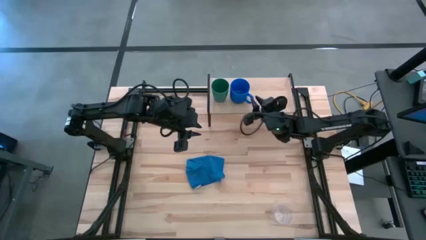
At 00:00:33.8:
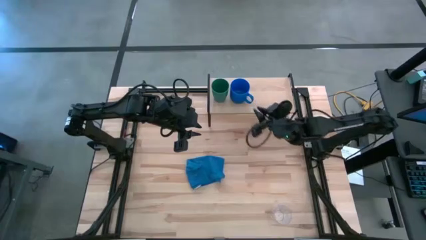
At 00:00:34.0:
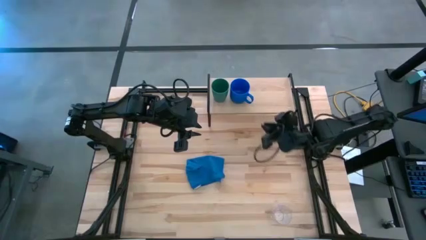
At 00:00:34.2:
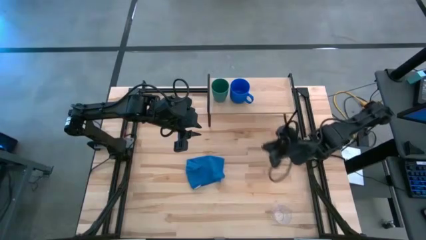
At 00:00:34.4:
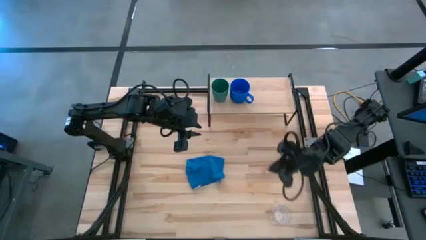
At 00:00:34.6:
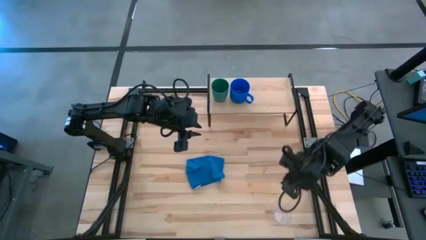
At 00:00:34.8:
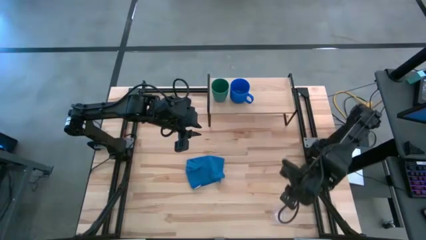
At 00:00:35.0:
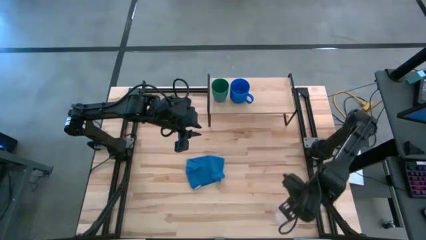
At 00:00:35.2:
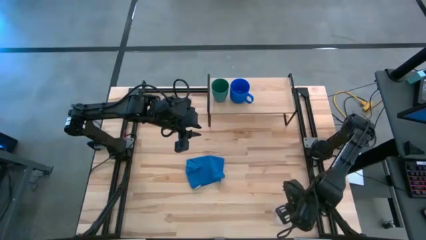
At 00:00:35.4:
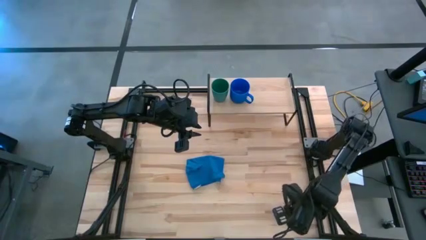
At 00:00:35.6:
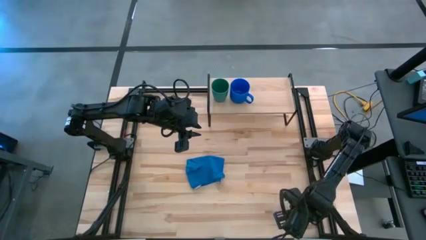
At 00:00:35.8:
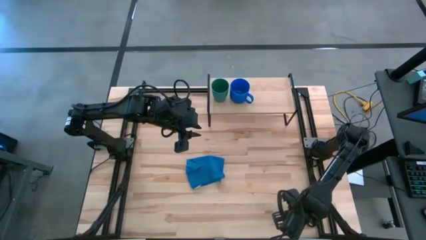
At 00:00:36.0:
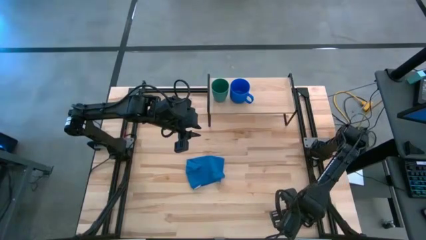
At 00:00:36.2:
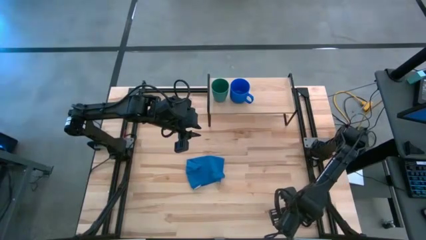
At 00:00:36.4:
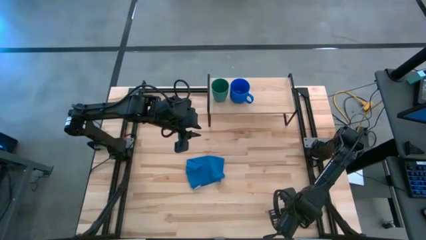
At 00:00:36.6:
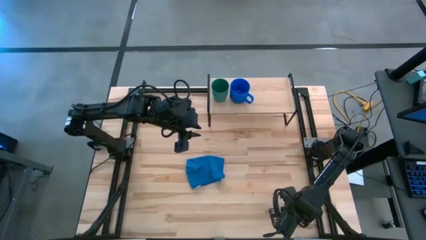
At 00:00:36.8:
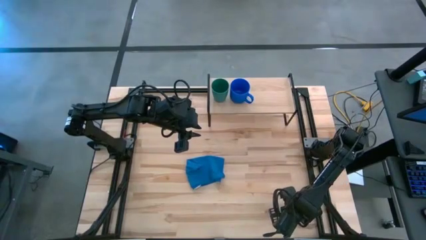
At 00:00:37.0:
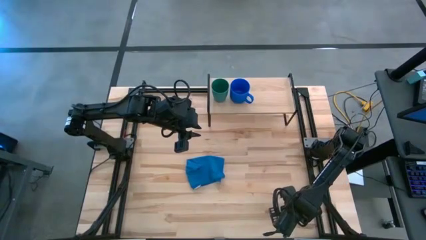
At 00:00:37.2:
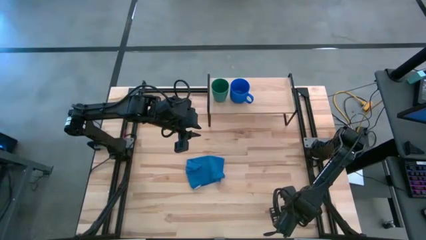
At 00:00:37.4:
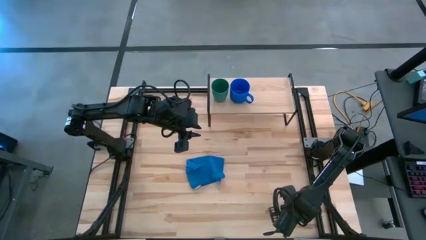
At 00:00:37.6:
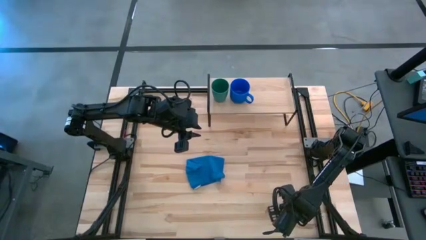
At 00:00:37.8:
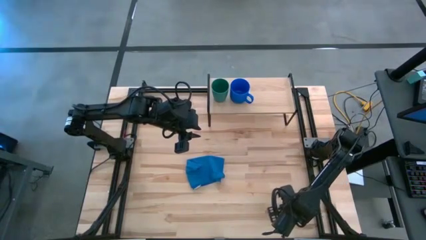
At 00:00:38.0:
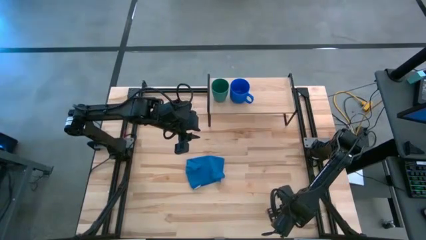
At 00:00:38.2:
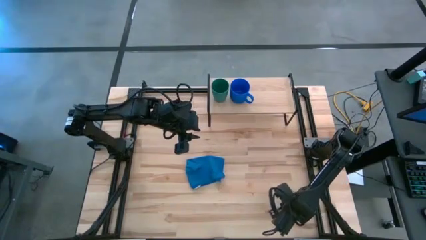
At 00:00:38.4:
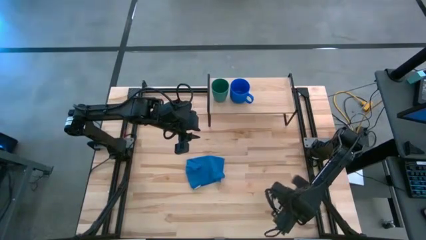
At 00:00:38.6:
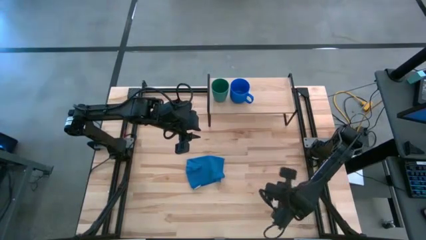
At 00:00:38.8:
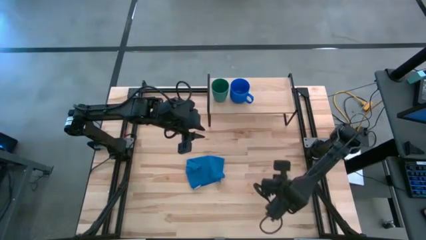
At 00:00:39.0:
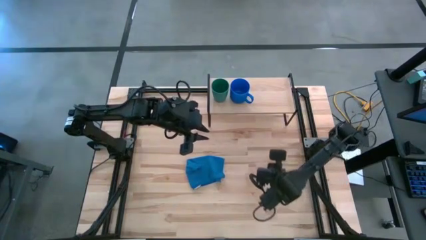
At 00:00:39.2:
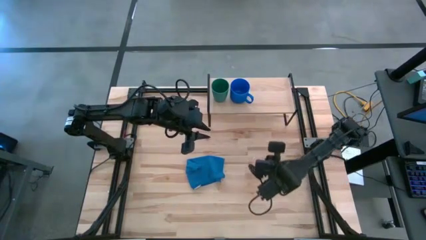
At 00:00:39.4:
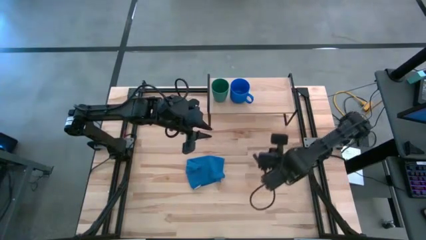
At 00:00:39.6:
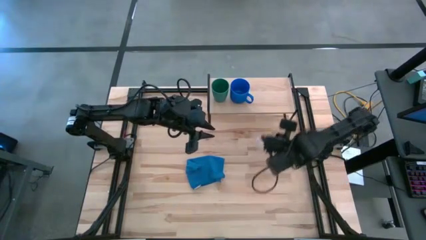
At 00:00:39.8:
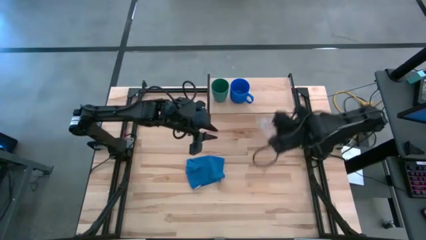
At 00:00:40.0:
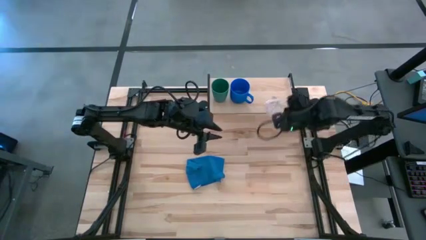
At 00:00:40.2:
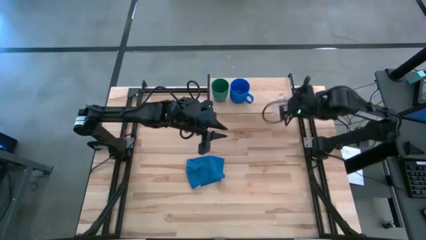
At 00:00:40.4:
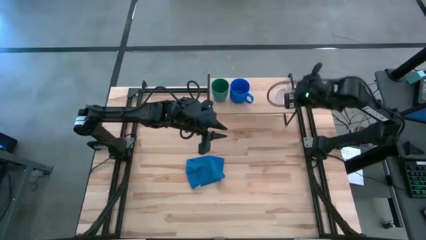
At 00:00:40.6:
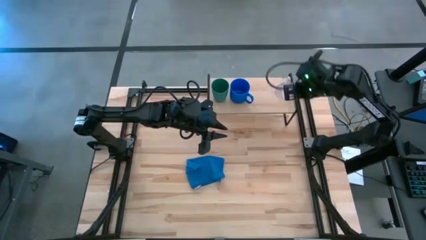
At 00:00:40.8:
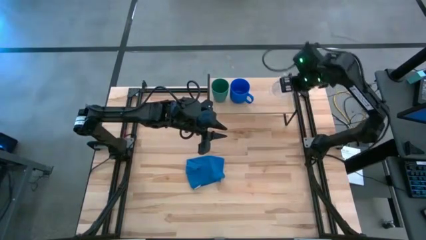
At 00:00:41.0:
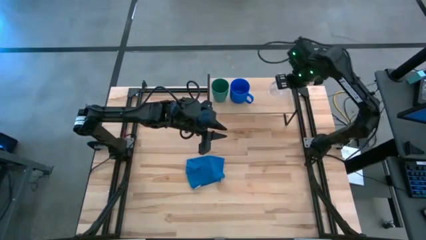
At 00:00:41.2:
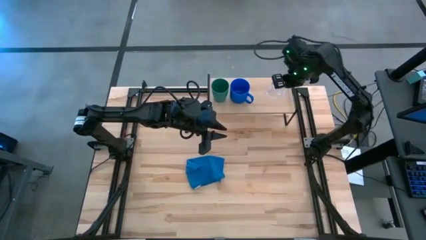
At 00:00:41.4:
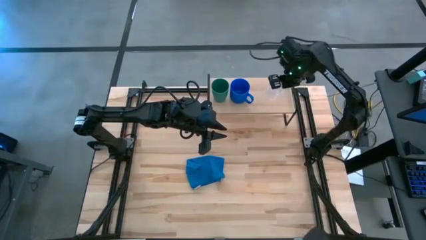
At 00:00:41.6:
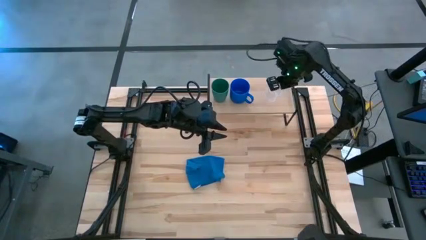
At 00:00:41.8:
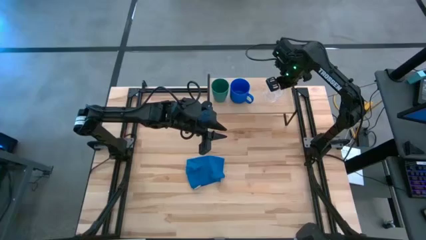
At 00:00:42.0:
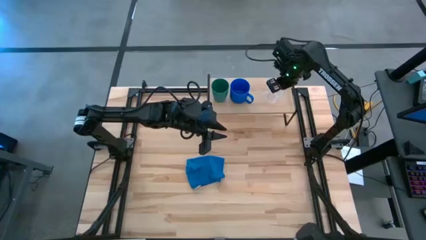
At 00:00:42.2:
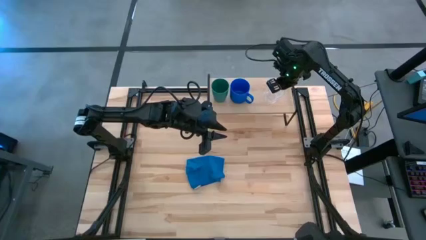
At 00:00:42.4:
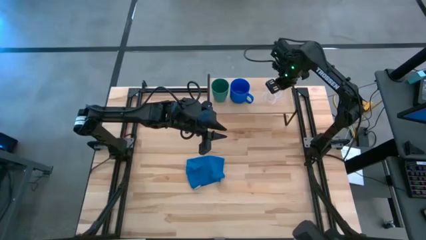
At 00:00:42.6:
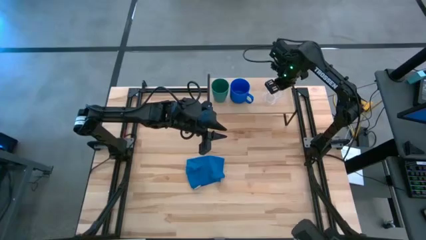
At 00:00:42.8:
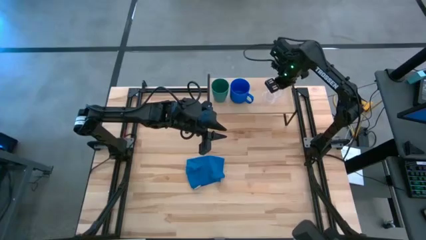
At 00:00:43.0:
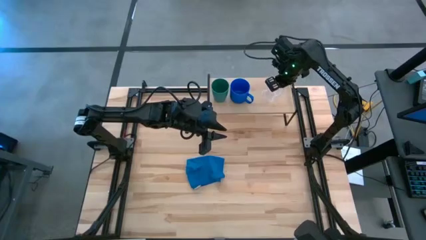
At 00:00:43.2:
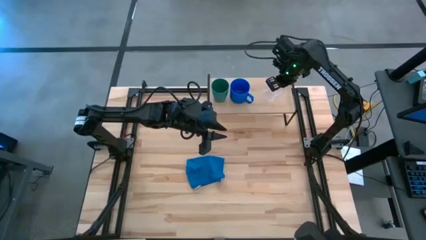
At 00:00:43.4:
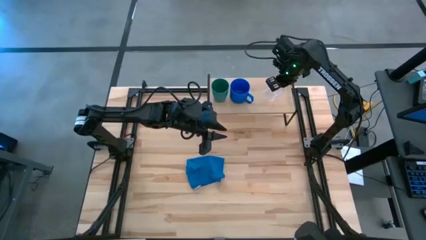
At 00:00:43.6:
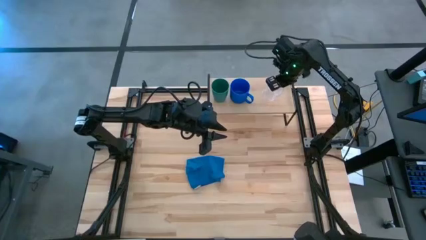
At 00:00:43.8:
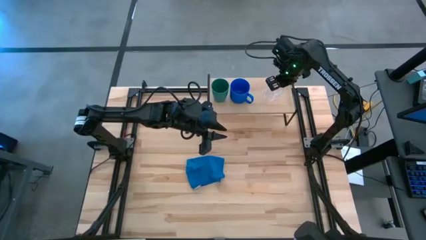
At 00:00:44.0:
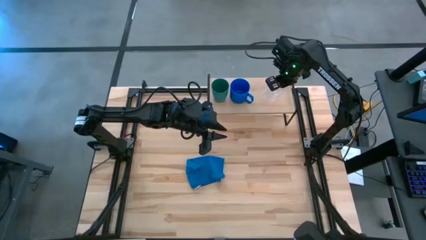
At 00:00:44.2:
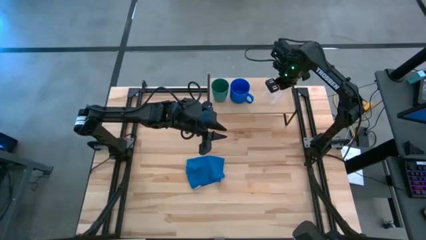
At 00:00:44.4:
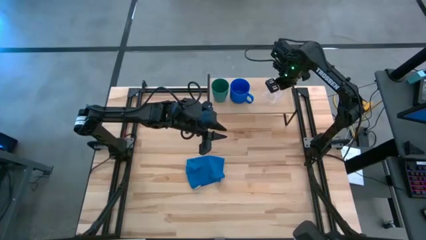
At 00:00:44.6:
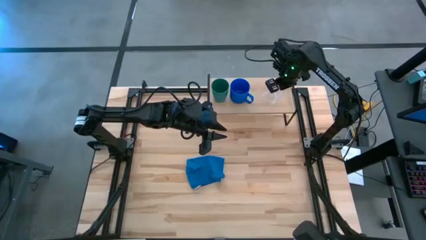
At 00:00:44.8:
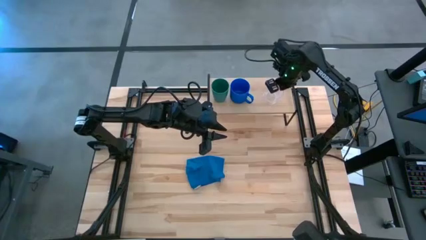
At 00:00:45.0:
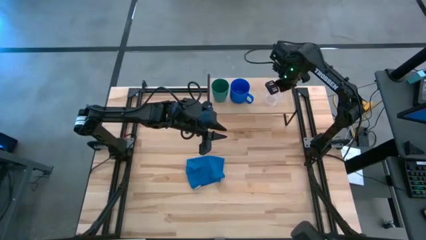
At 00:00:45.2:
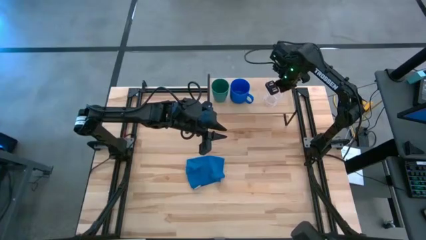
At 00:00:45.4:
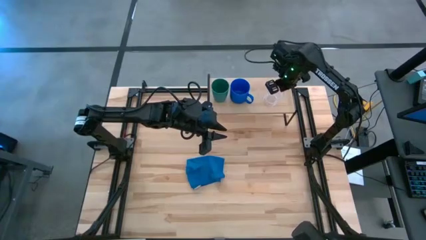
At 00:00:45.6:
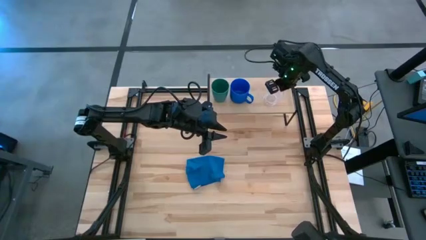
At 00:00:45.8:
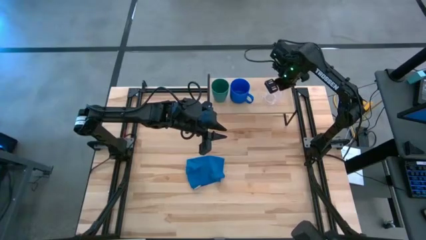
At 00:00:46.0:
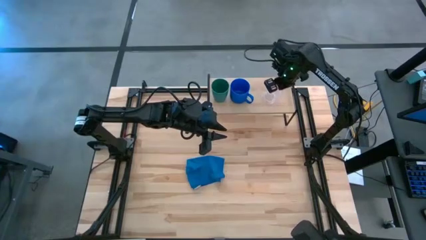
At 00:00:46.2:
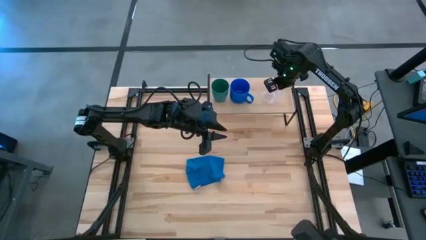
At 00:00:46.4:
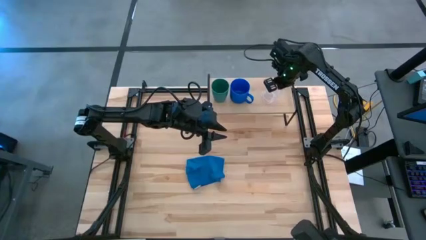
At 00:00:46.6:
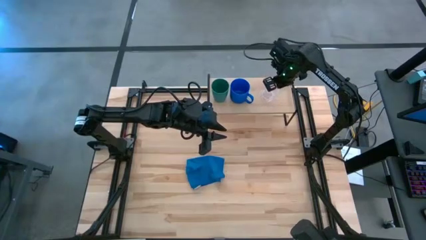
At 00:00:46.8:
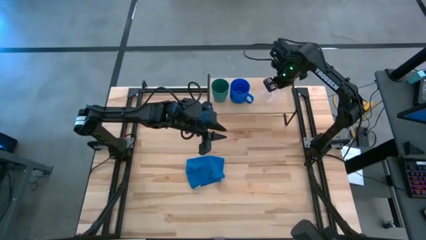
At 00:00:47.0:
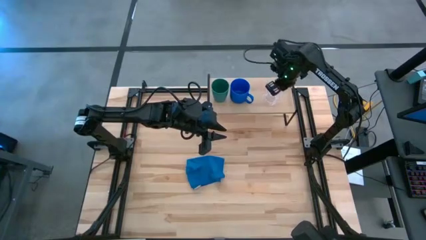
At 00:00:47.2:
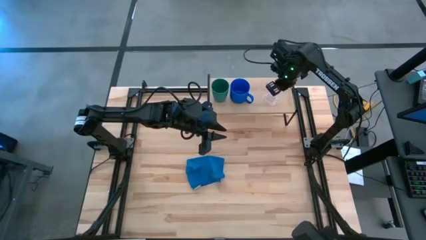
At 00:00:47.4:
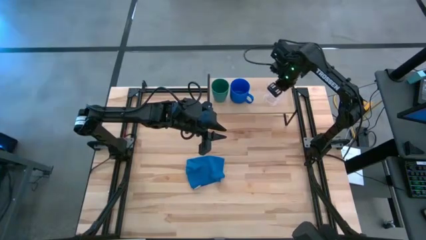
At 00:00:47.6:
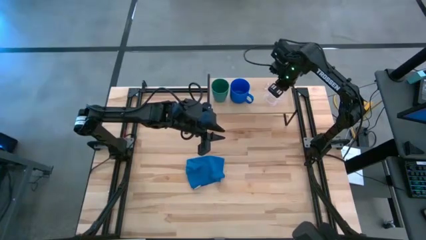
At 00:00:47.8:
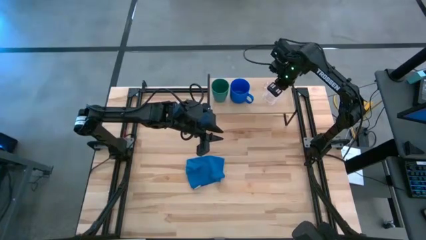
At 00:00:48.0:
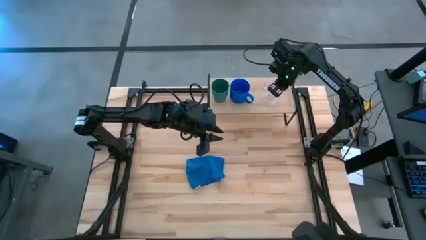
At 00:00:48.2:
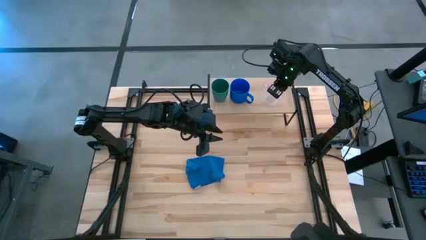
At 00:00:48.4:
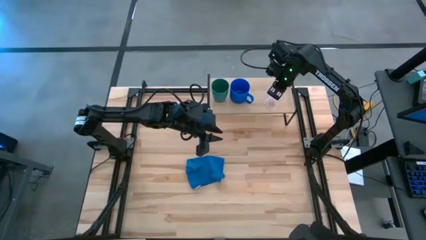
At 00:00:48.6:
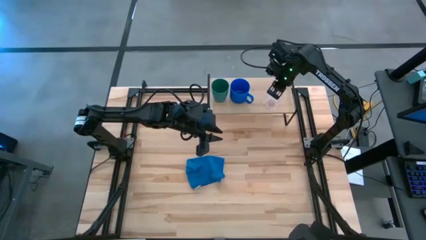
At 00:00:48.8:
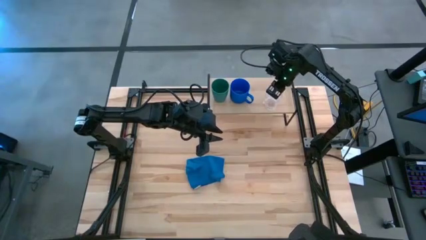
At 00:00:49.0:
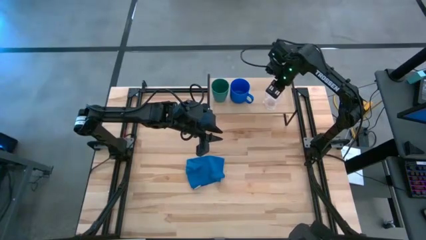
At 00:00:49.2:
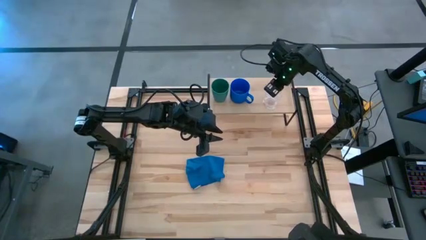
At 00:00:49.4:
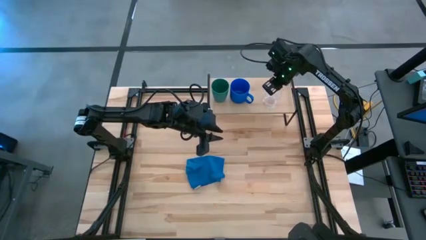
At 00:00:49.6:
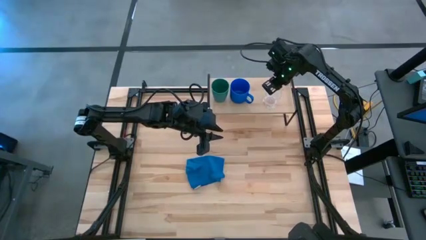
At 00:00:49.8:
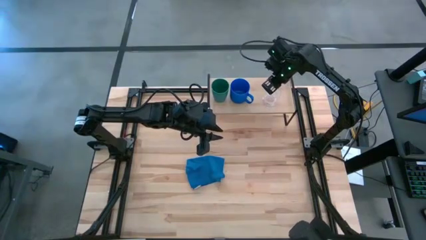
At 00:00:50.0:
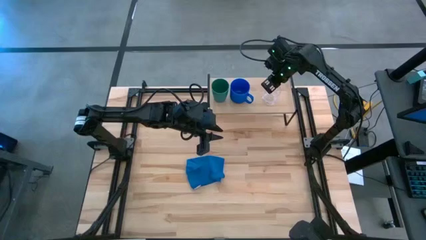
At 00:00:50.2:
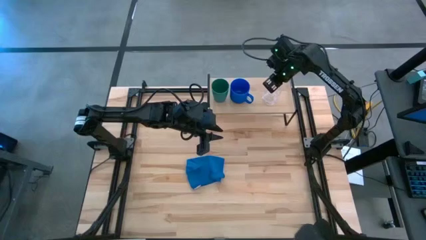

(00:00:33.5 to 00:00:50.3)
Task: Stack small to large cups/mugs on shelf
Put the transparent mug on the shelf
